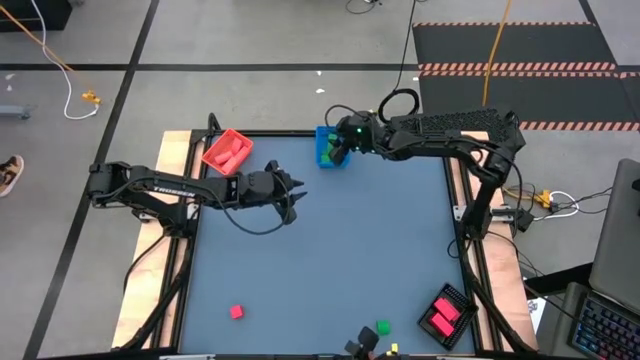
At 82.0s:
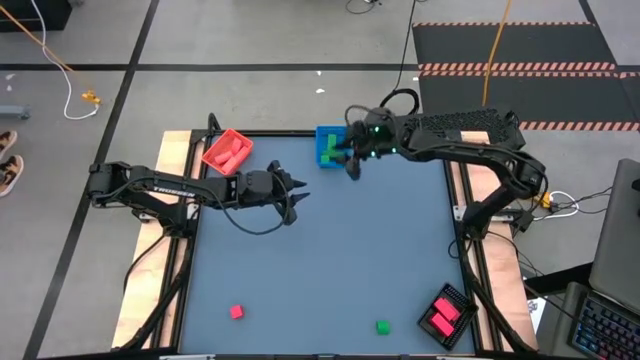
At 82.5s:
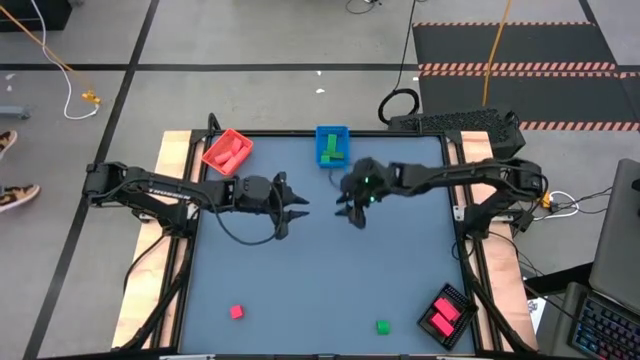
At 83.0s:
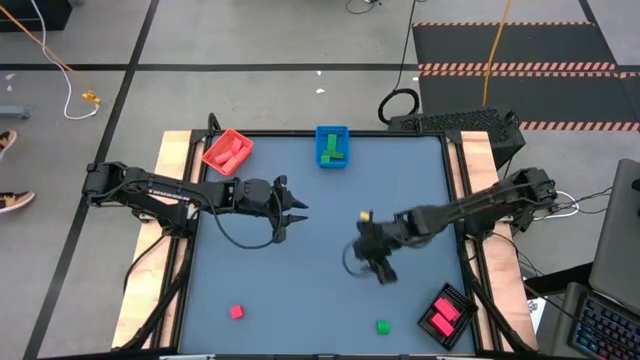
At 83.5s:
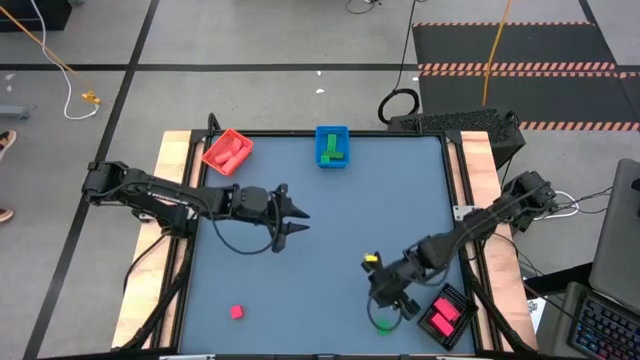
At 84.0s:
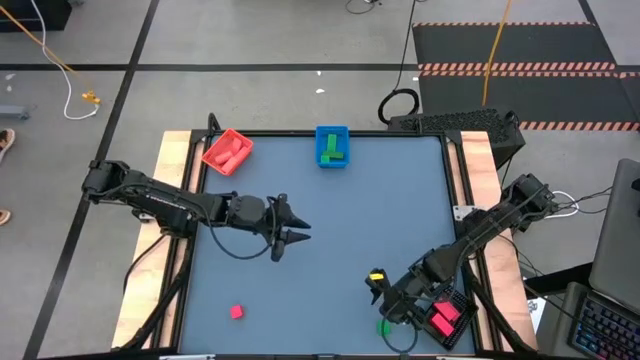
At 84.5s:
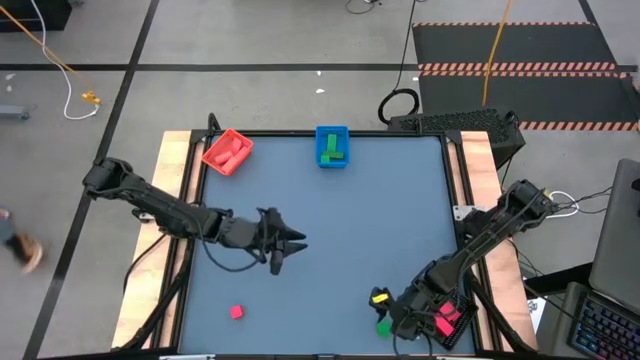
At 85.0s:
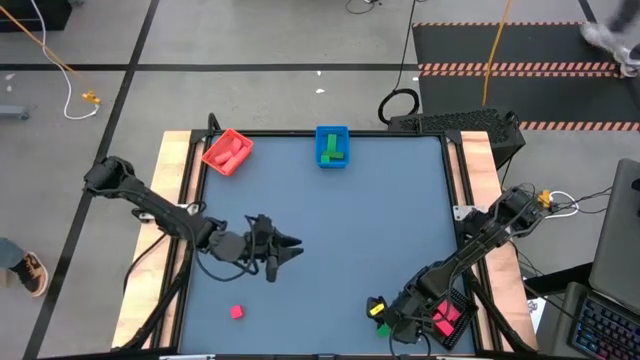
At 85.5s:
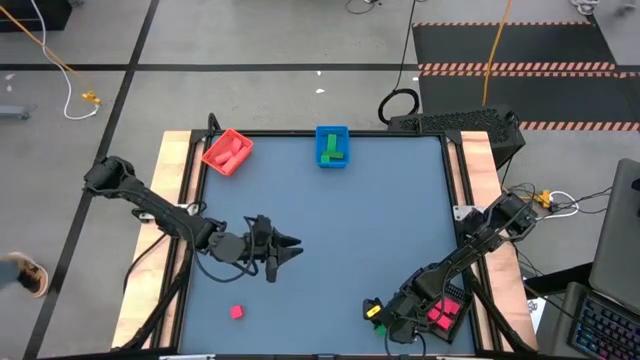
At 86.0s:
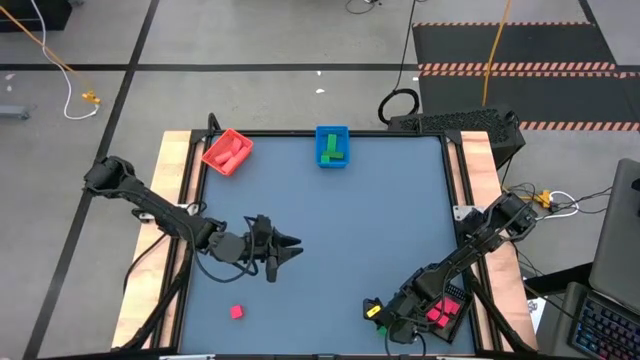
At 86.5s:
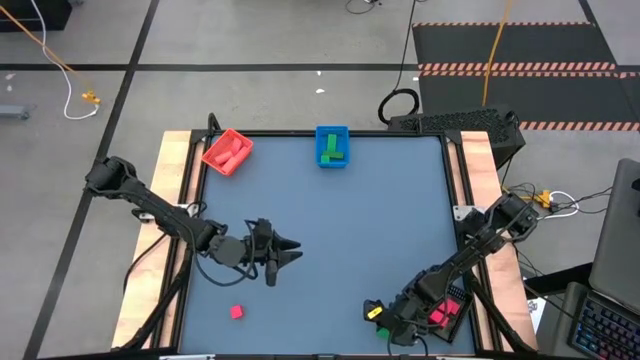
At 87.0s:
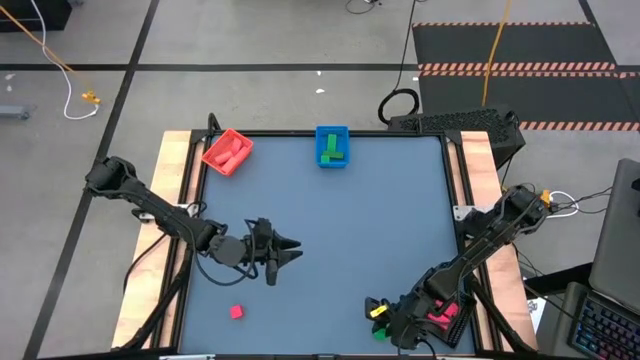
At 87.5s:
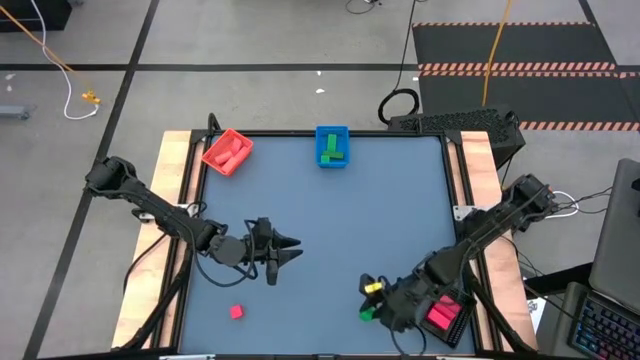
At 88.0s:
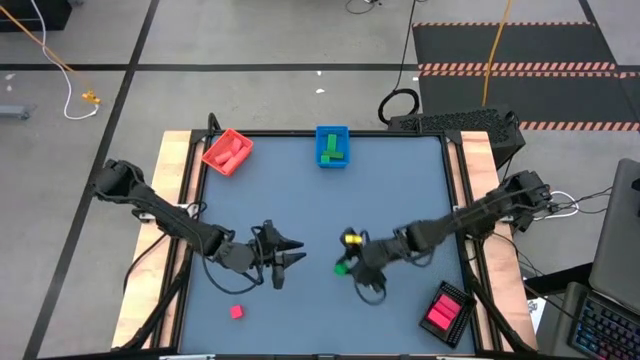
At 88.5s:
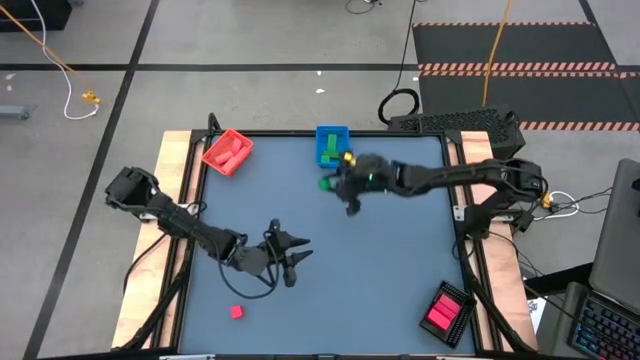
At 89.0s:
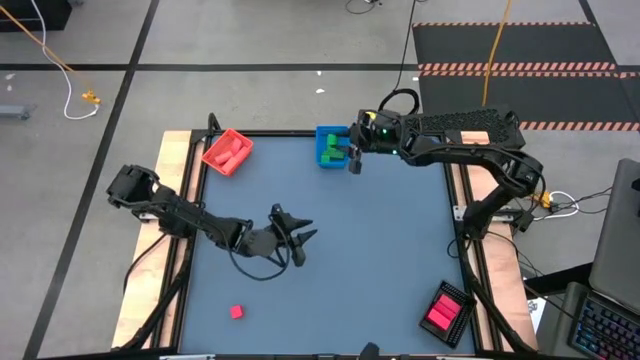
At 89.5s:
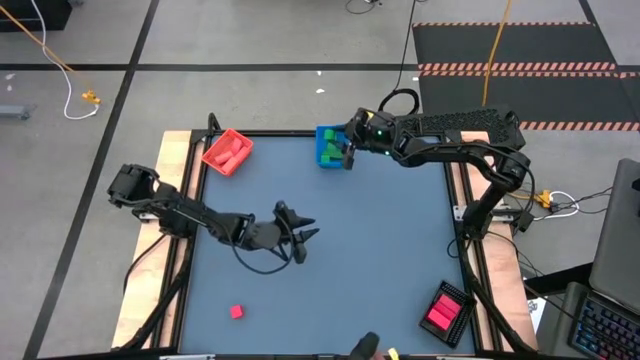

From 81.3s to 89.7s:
Task: Sort & place blocks by color
Put the green block into the blue bin

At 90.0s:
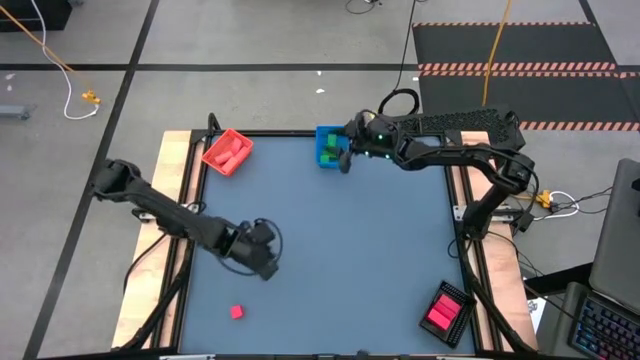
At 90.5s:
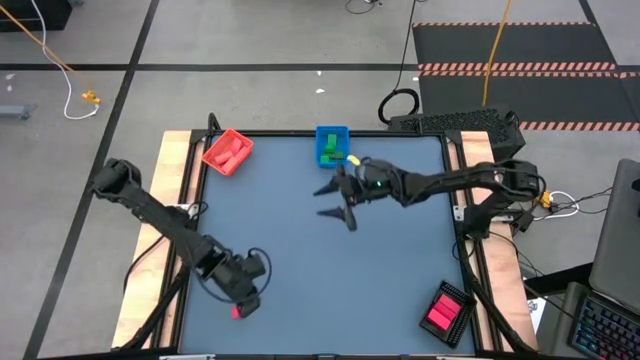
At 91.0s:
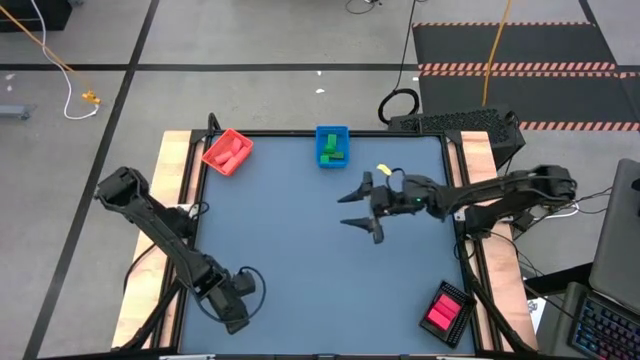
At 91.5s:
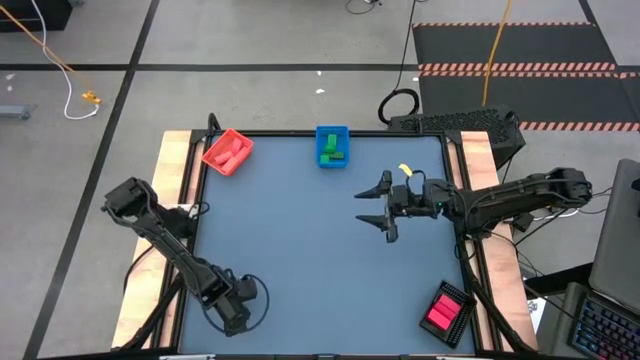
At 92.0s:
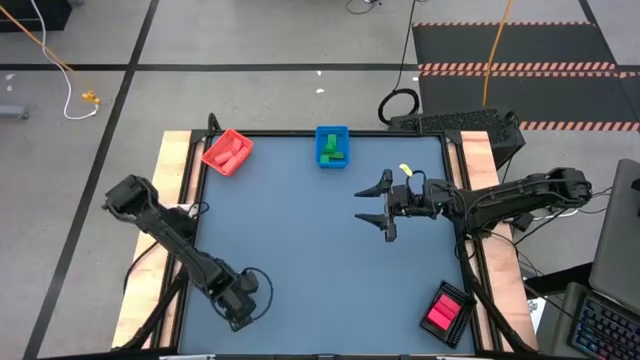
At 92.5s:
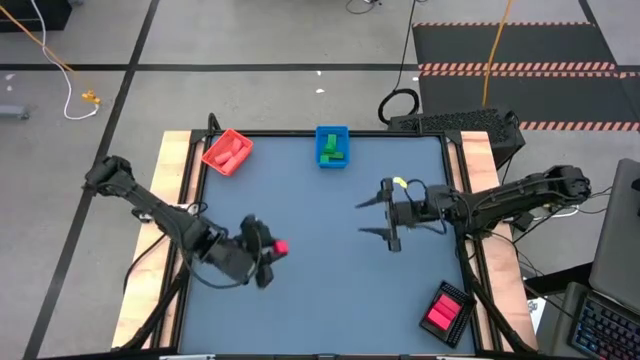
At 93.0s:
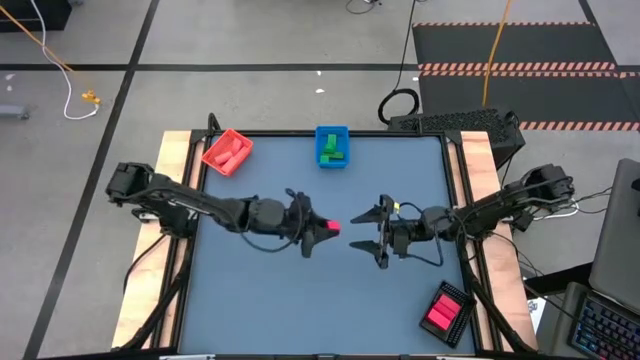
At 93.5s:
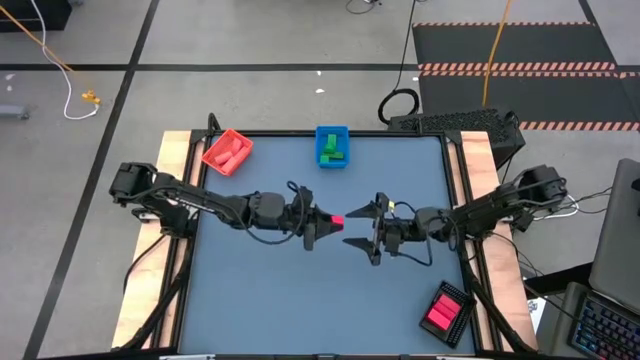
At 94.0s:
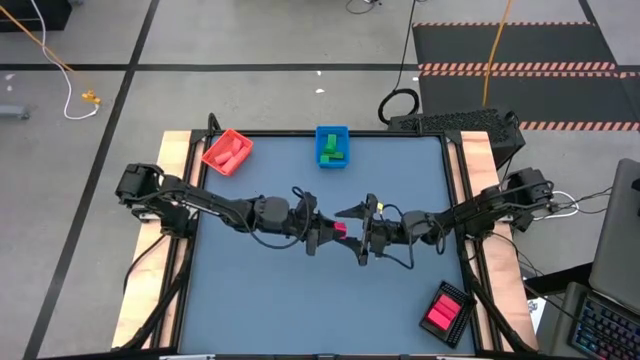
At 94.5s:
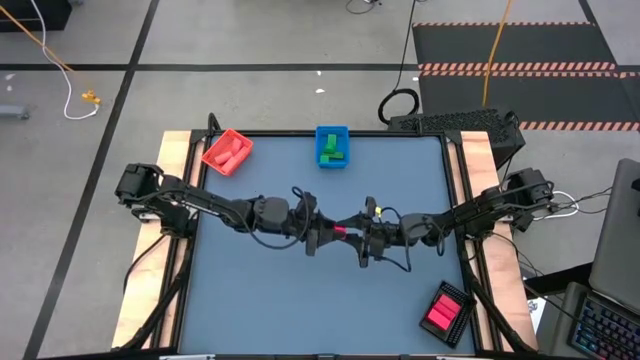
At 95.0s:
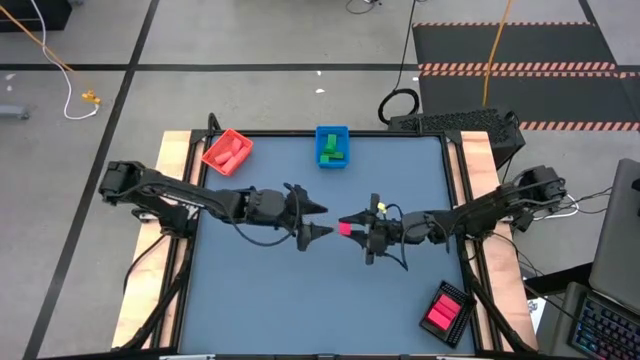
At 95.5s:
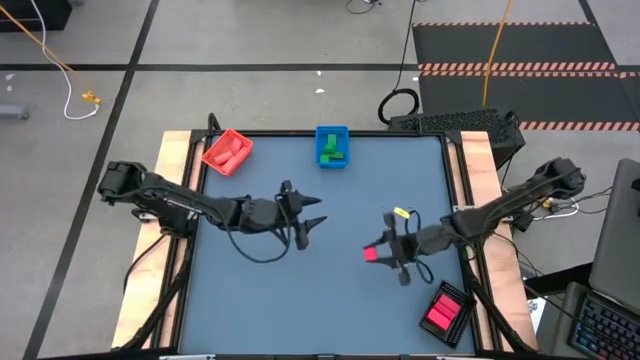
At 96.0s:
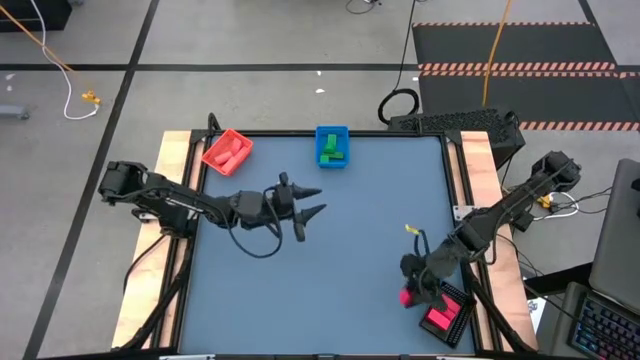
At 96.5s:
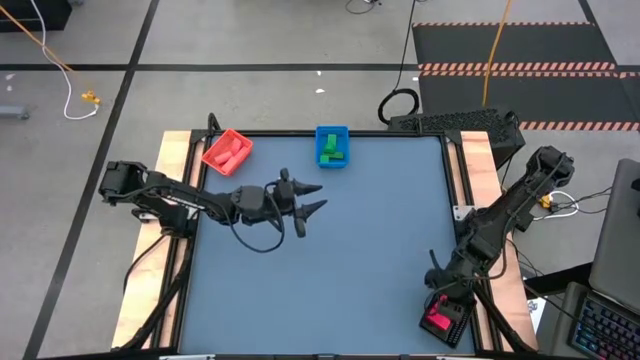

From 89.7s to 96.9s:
Put the red block into the black bin

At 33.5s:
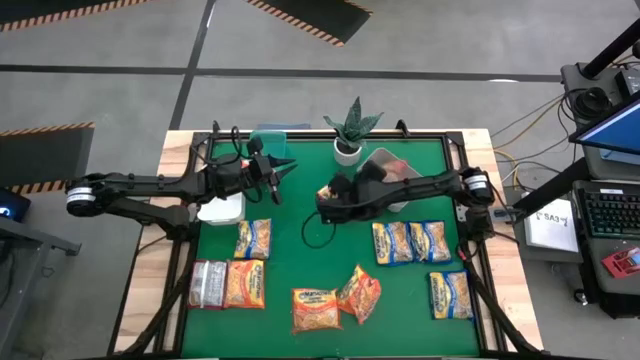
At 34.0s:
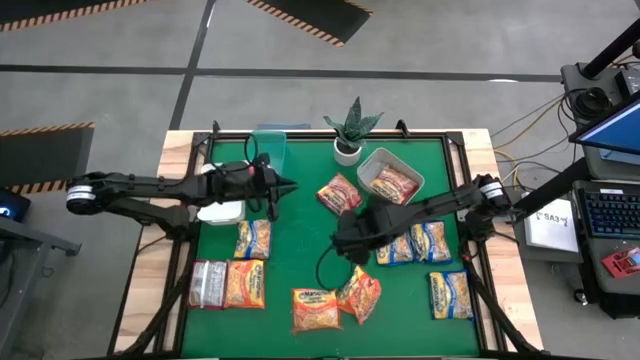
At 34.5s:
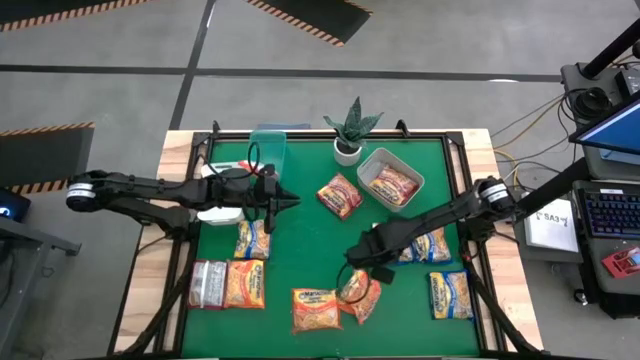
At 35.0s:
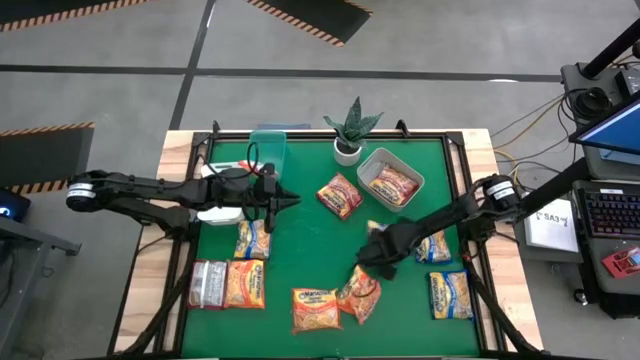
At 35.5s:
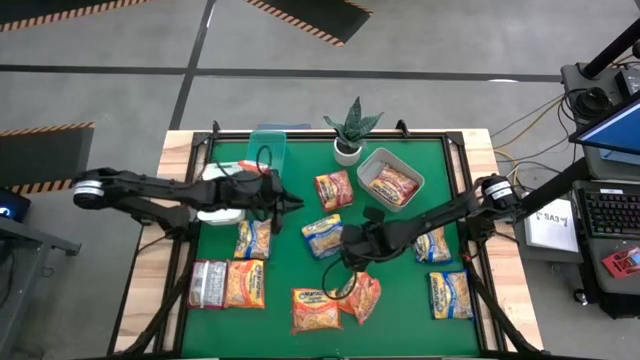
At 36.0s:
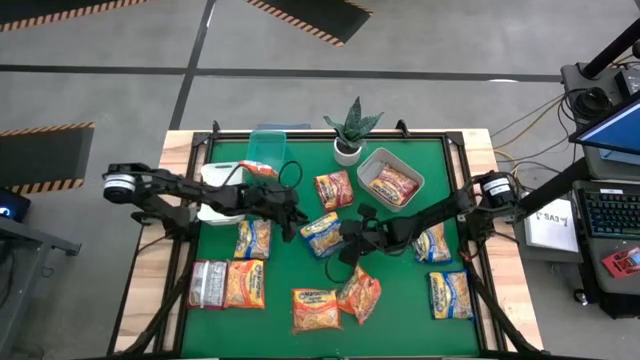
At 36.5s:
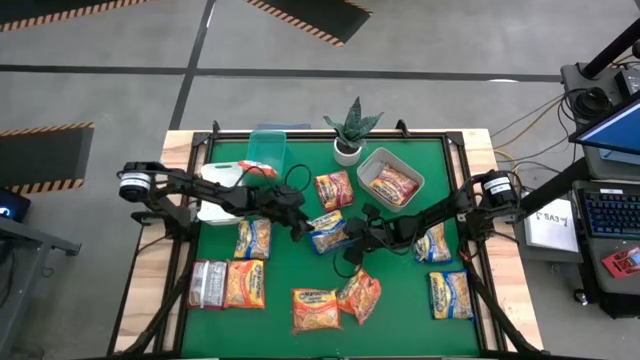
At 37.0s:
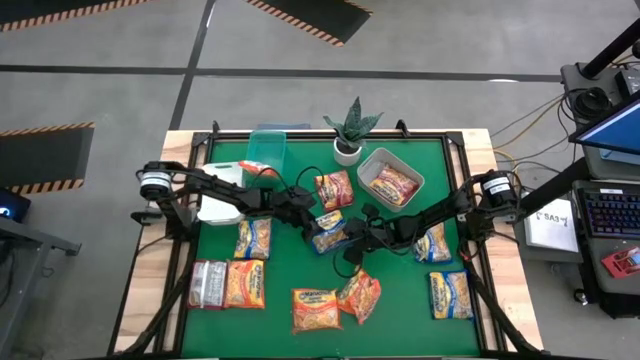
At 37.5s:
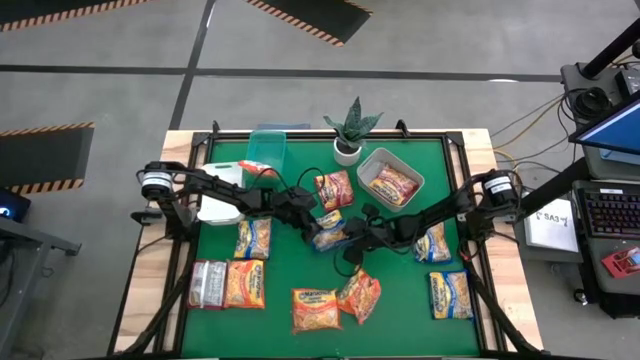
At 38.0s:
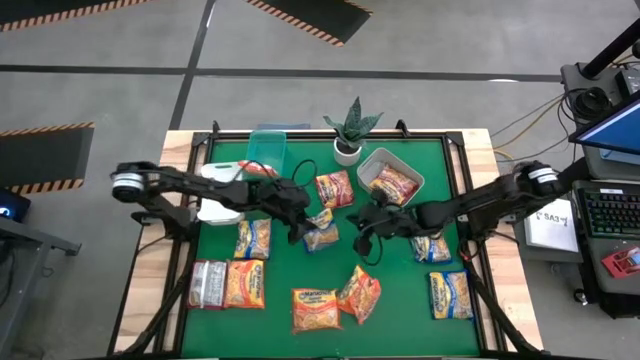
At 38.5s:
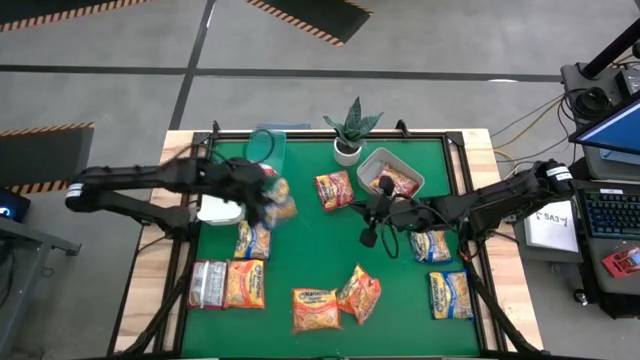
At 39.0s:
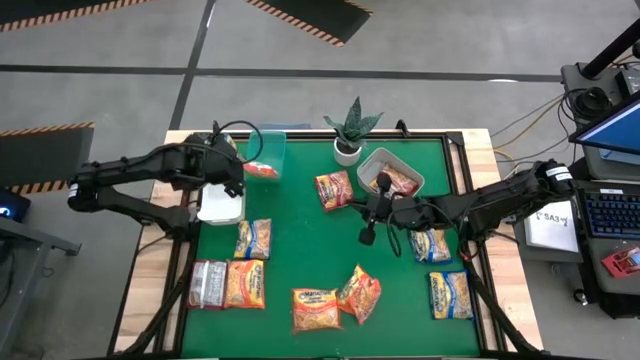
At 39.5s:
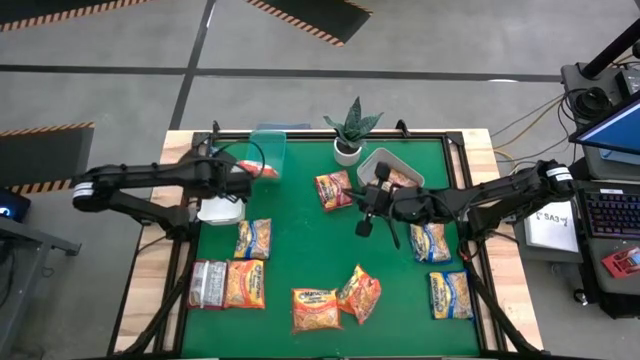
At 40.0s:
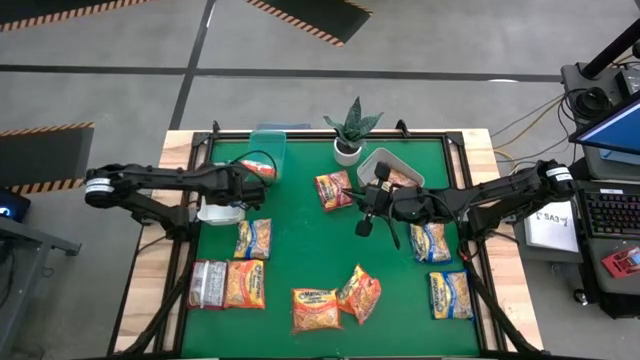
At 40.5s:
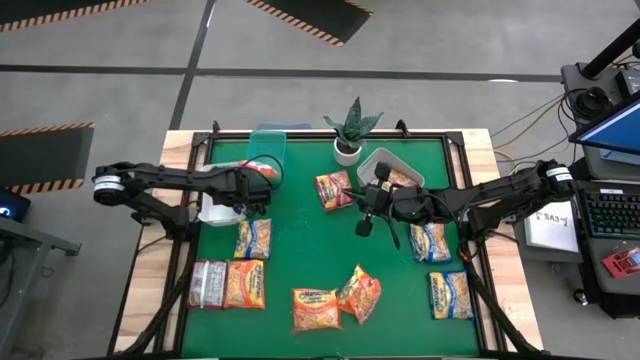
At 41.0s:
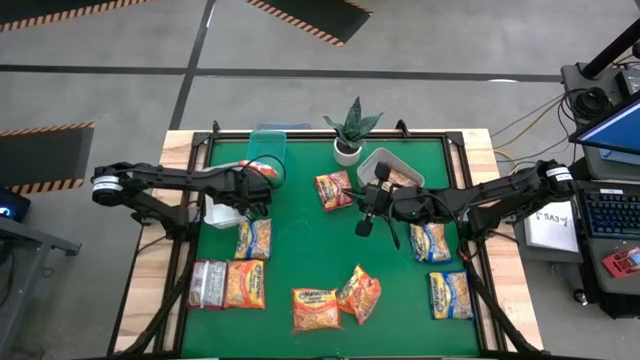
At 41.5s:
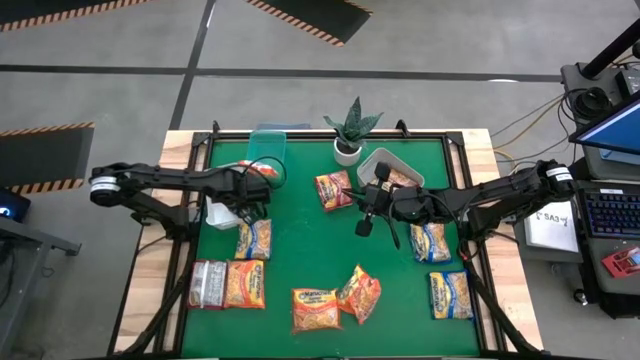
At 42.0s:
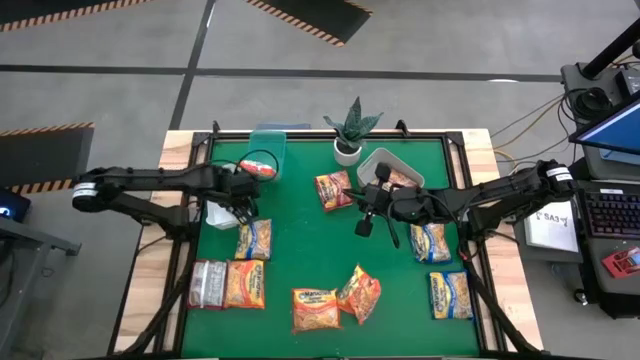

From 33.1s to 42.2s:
Task: Sort Maruchan noodles
Put the blue noodle pack into the white bin
